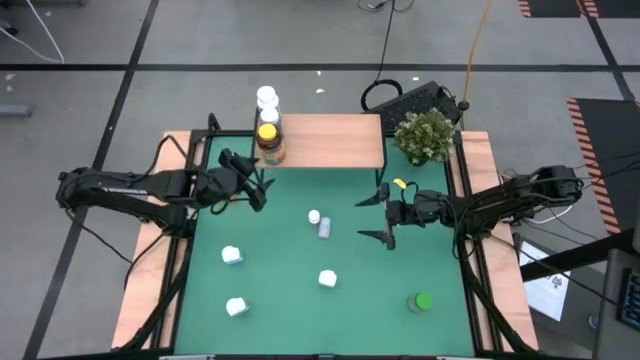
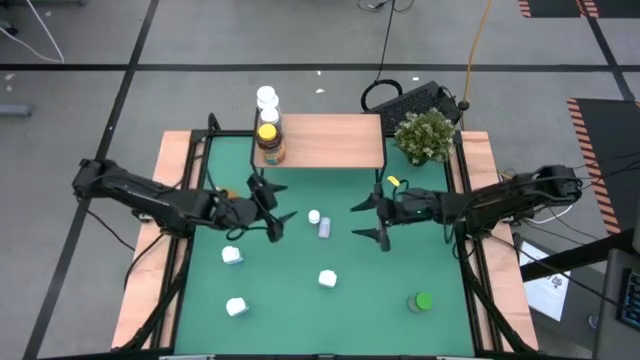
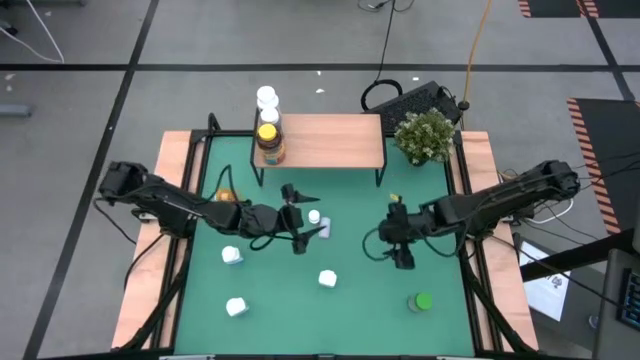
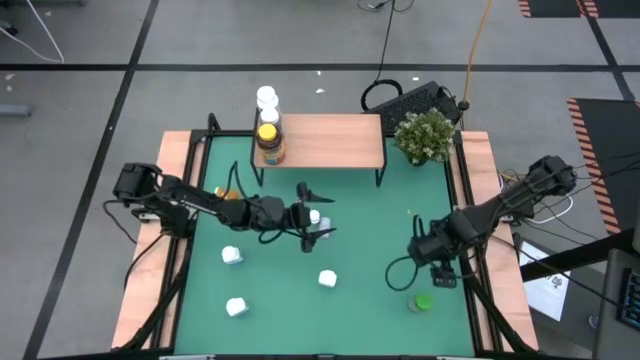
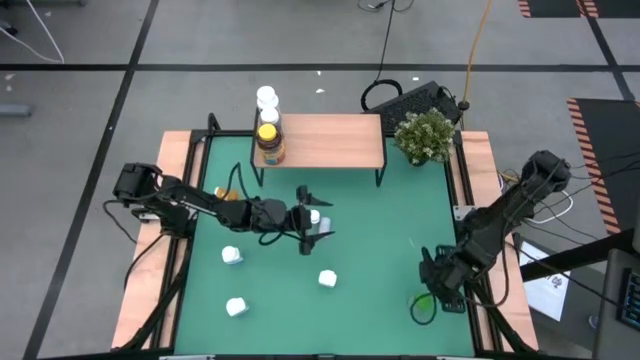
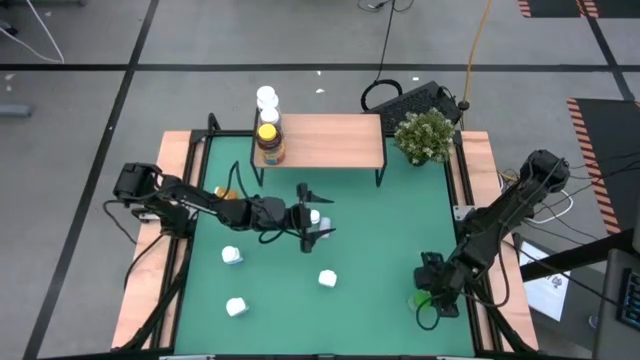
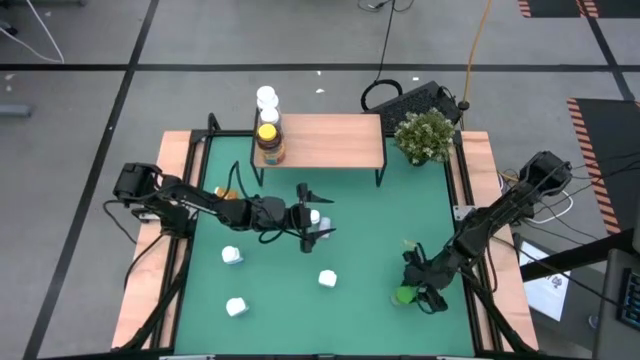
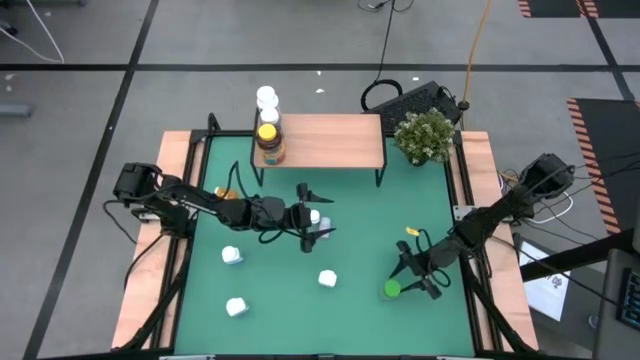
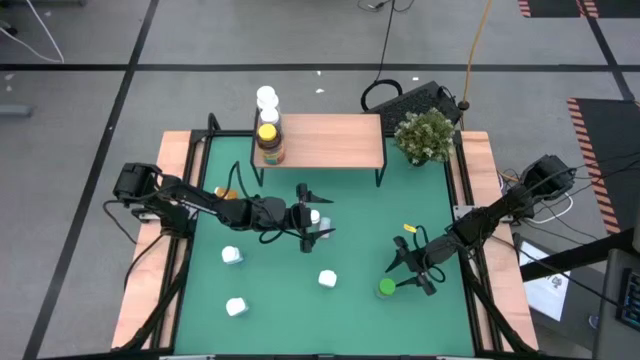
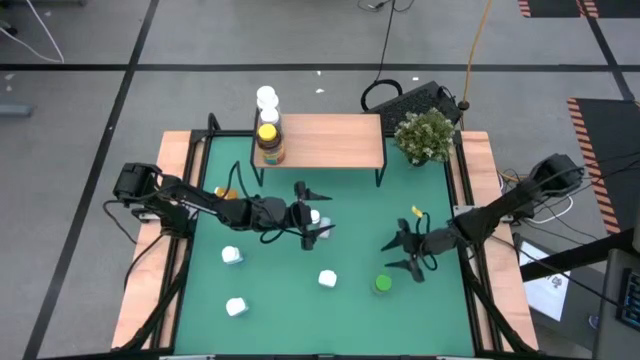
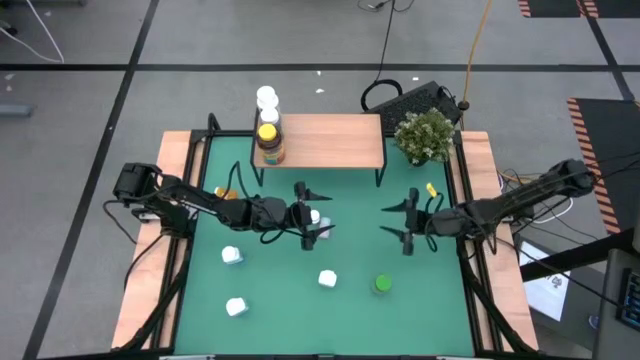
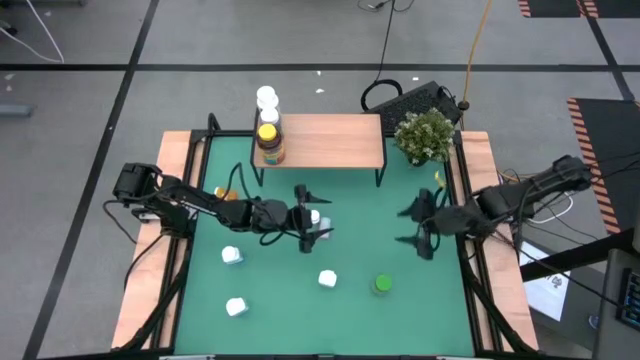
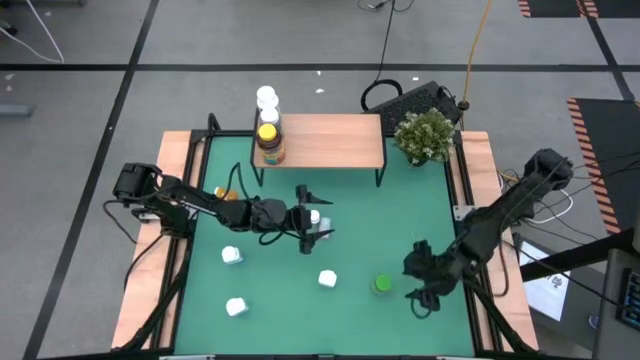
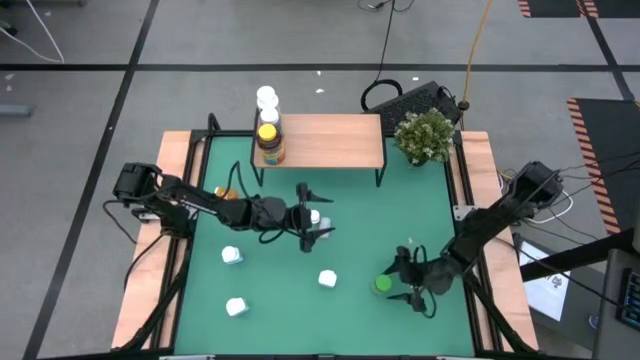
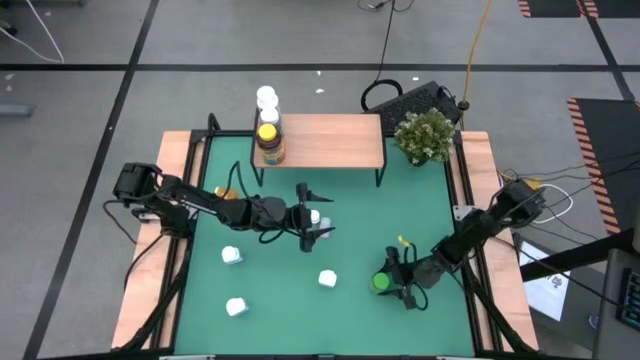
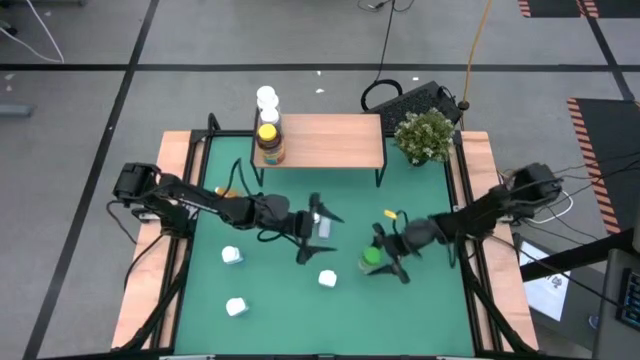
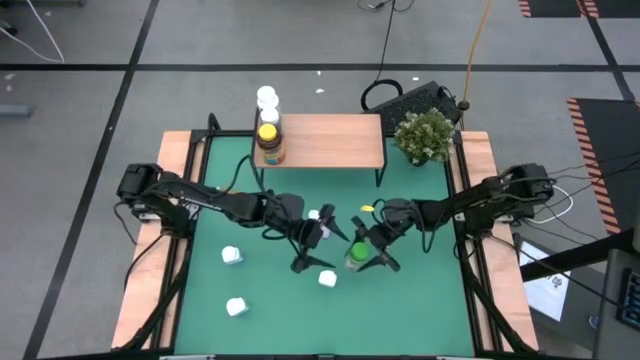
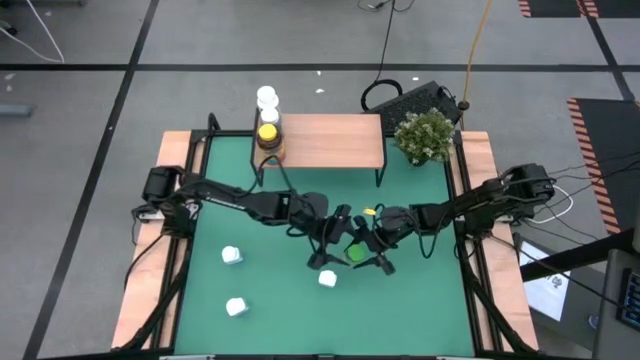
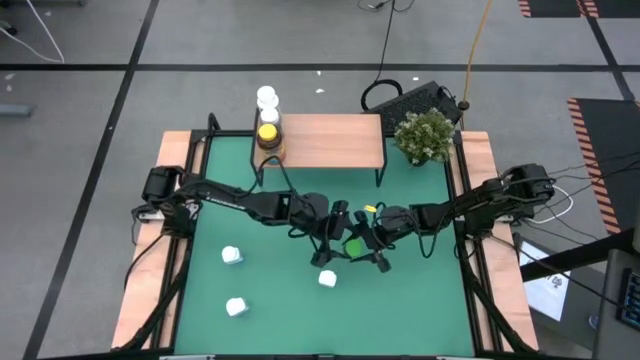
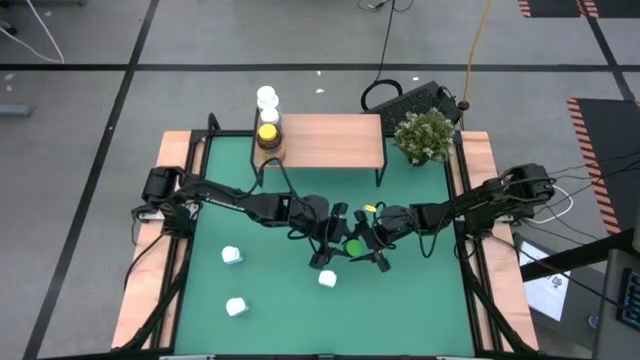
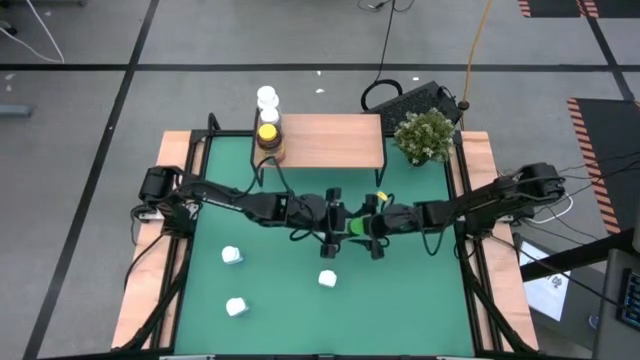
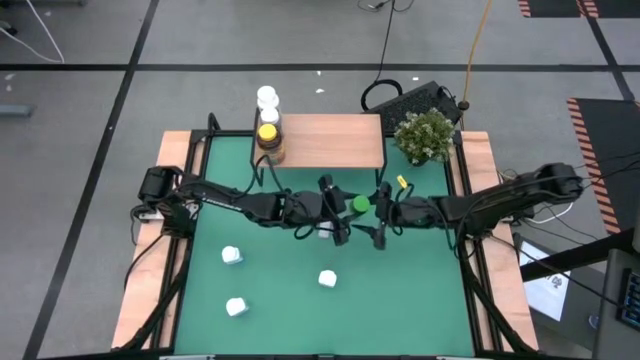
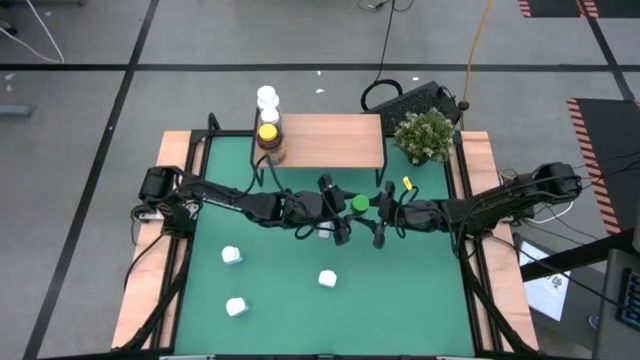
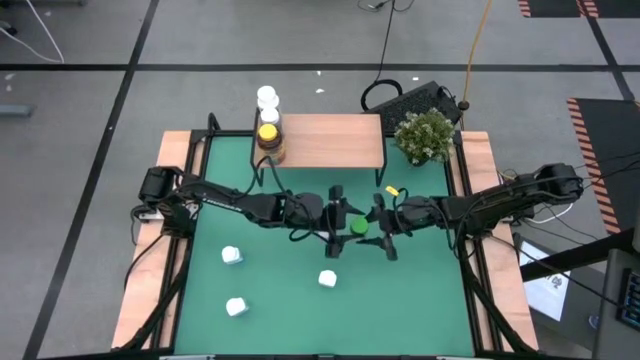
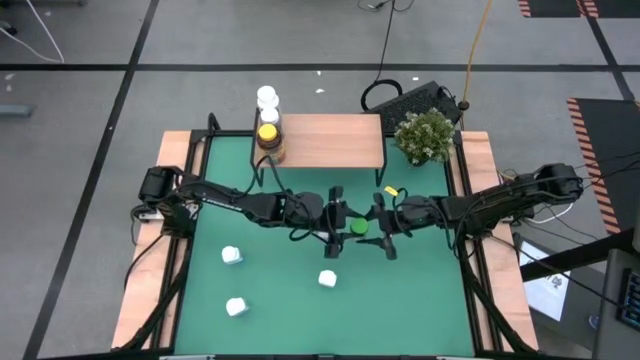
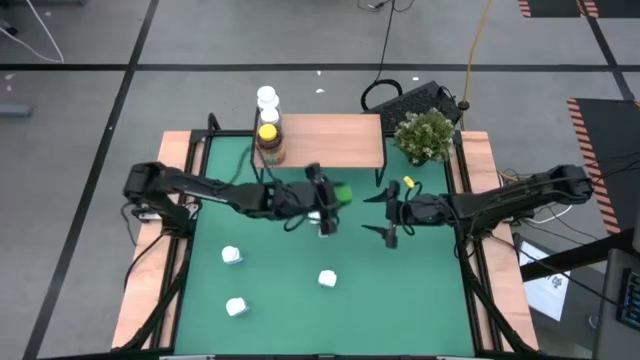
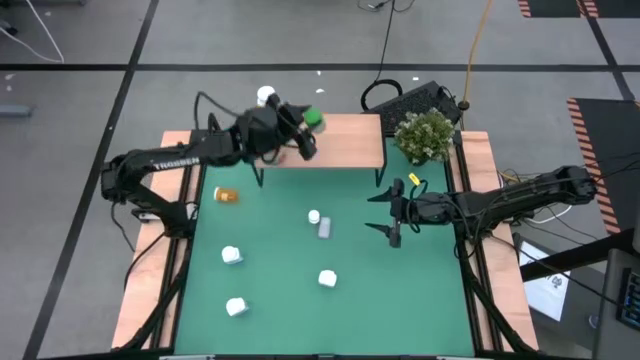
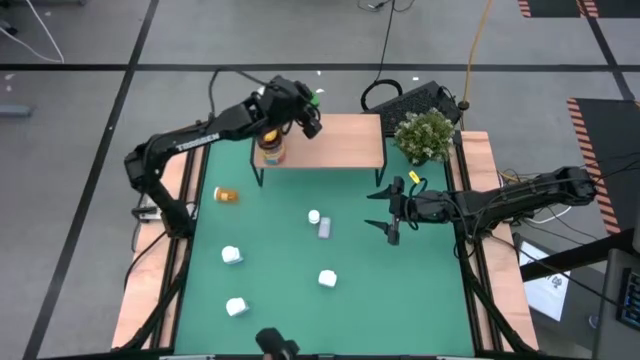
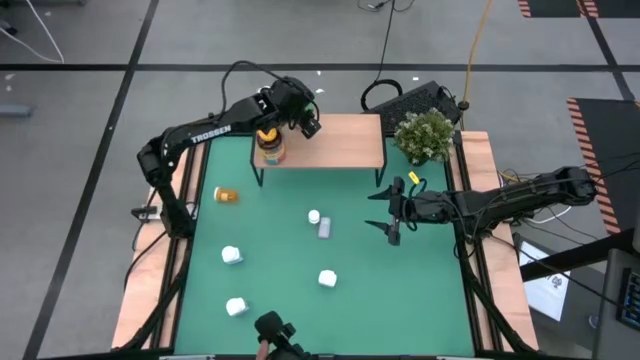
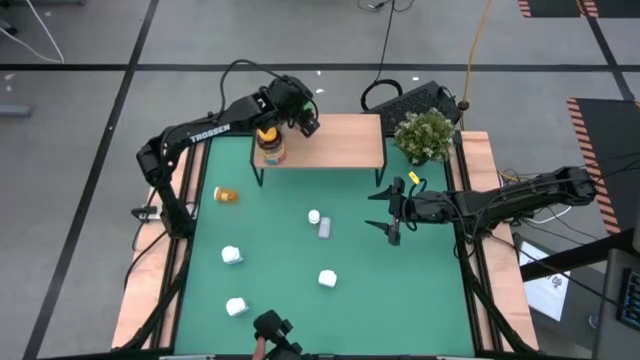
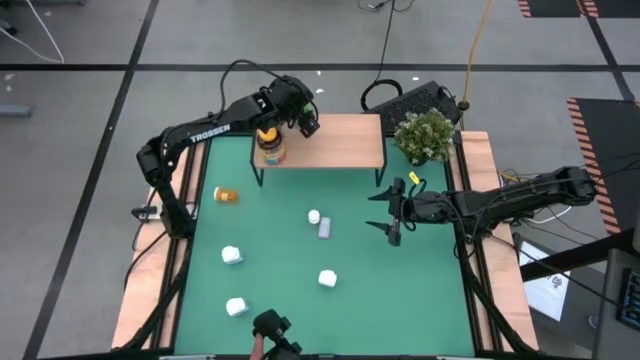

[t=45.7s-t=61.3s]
Task: Pick and place medicine bottles onto shelf by color
Put the green pill bottle on the shelf

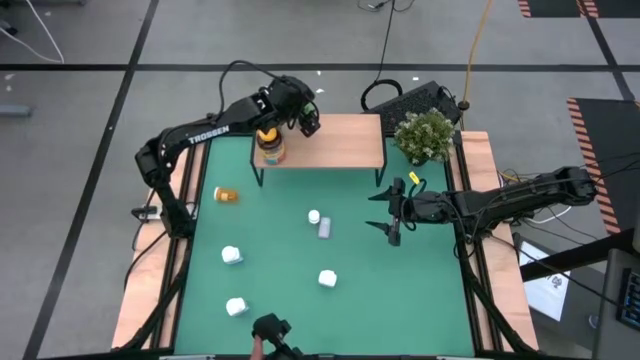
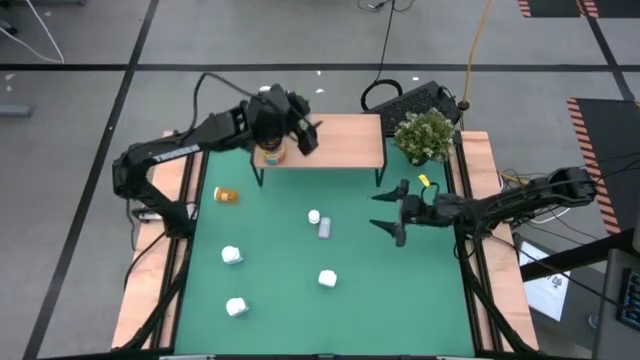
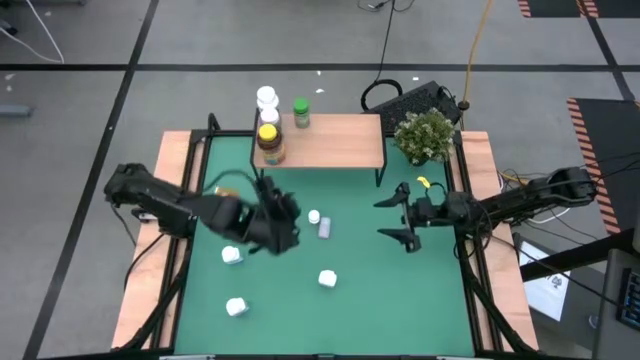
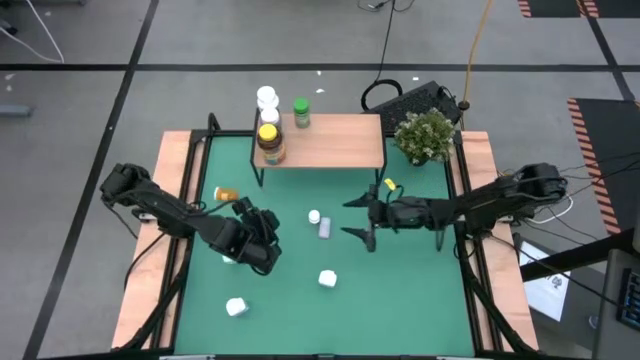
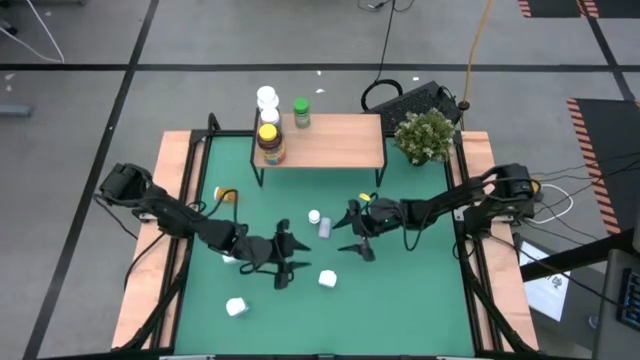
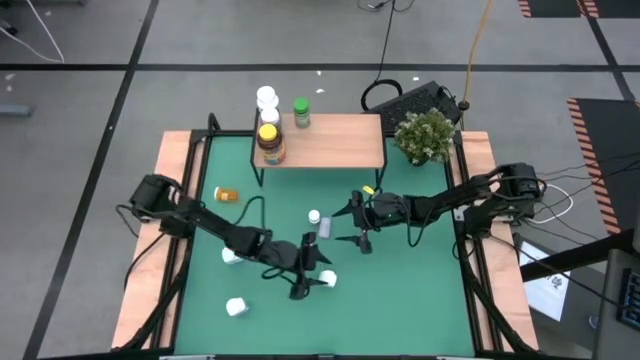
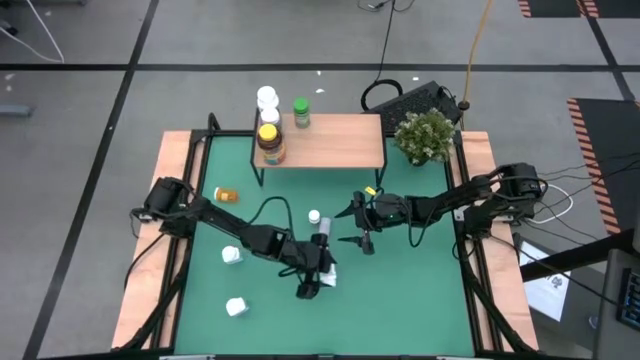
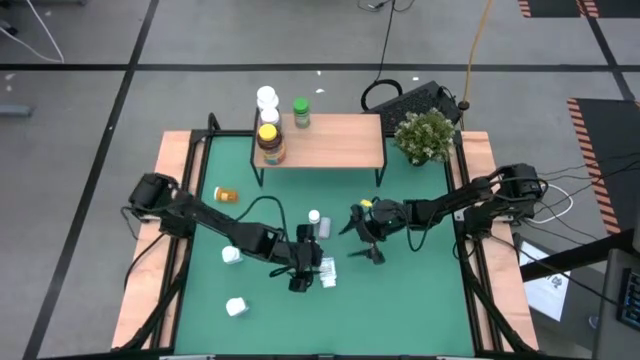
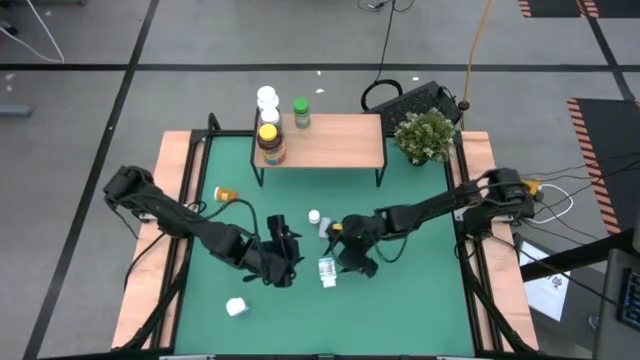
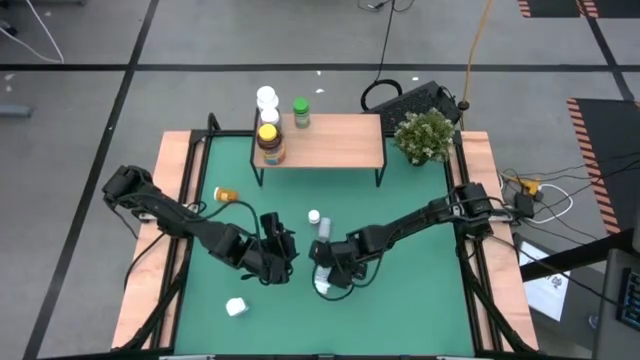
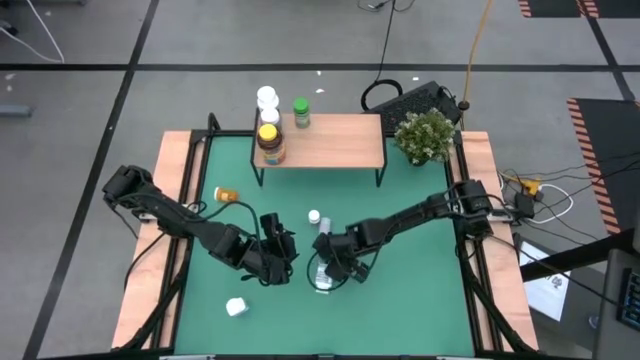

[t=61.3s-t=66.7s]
Put the right white and blue pill bottle on the shelf

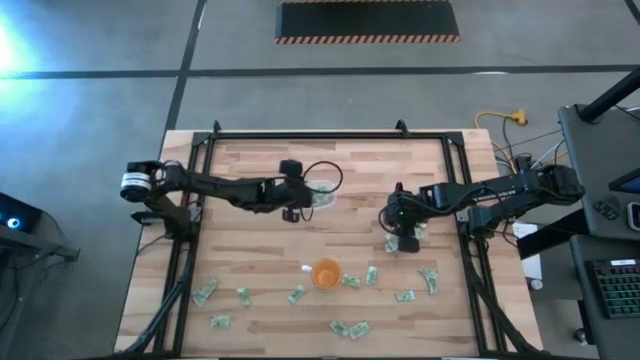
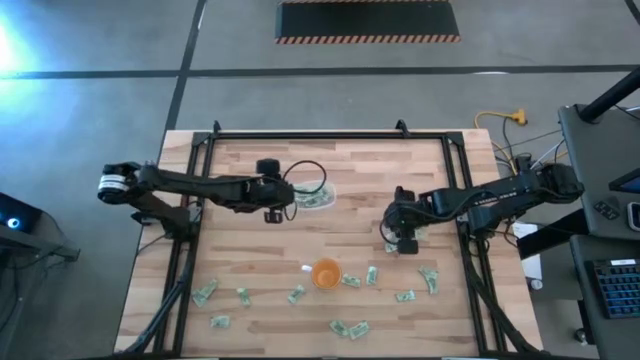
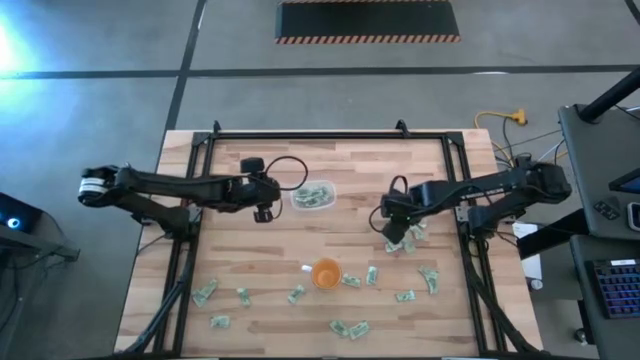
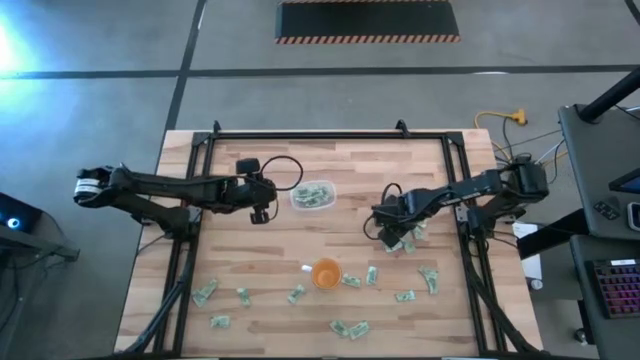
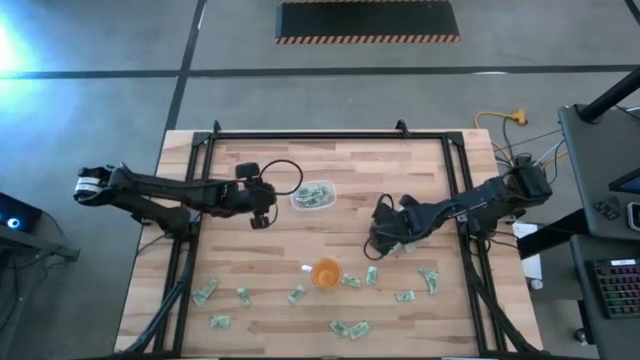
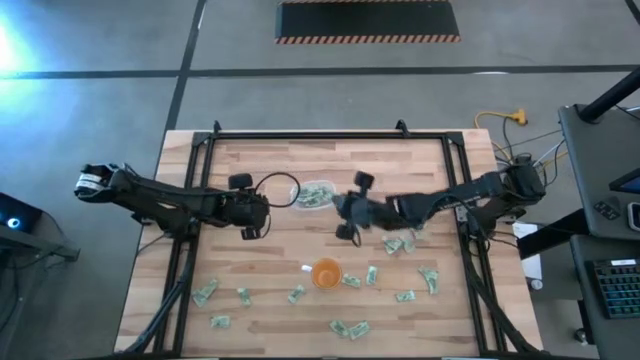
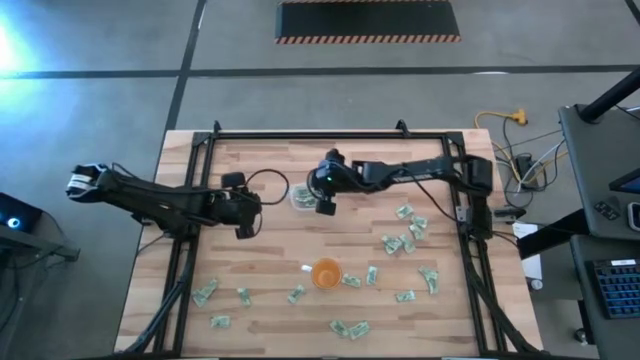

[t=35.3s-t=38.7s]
Task: Pick and place Stevia / Truvia into bins
Put the stevia packet into the transparent bin
